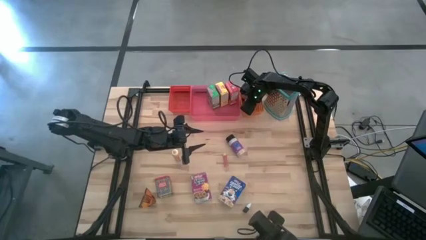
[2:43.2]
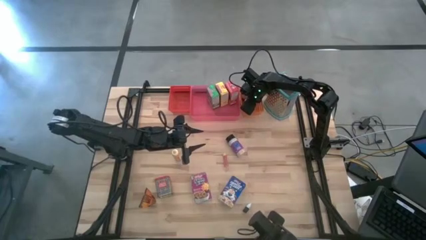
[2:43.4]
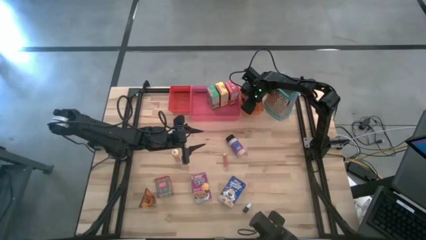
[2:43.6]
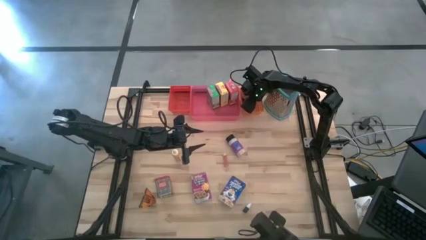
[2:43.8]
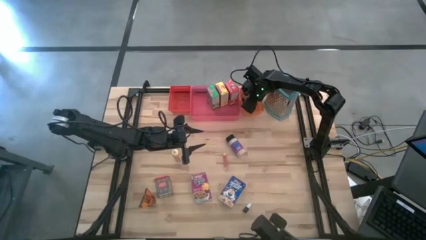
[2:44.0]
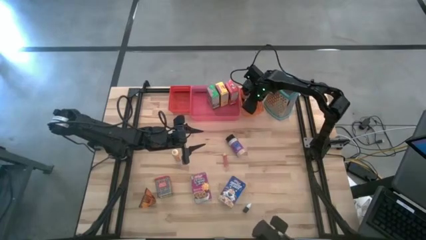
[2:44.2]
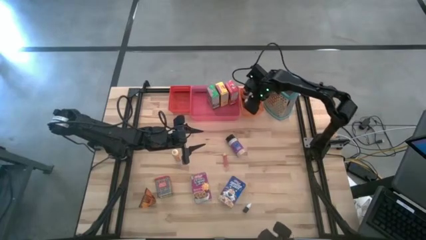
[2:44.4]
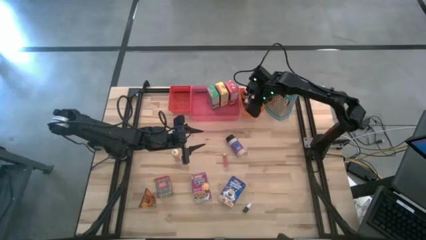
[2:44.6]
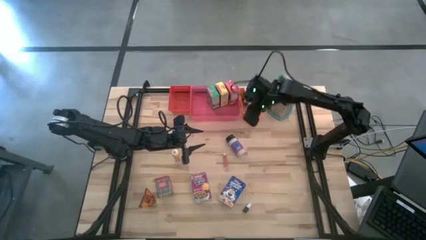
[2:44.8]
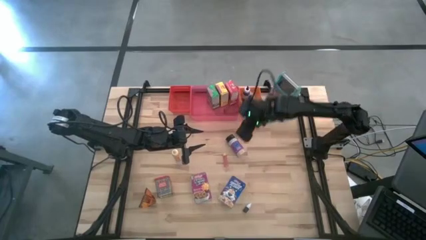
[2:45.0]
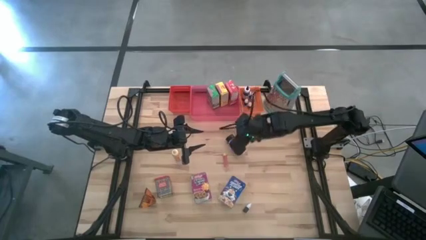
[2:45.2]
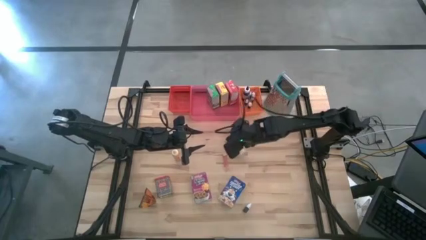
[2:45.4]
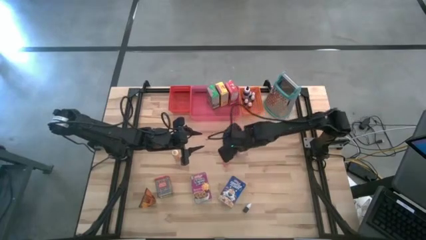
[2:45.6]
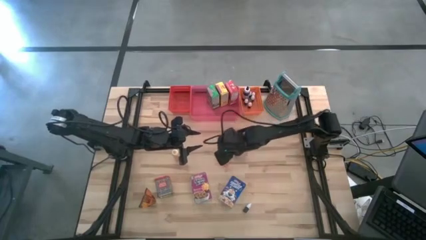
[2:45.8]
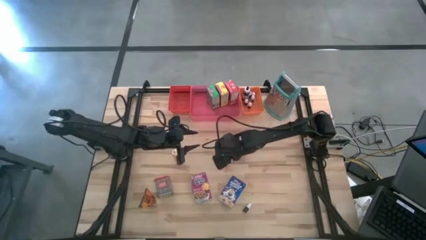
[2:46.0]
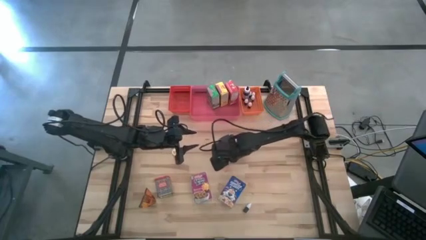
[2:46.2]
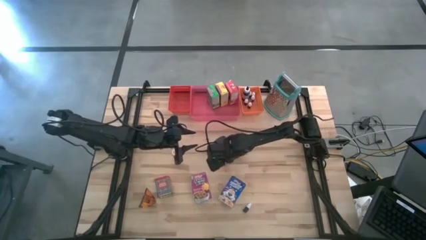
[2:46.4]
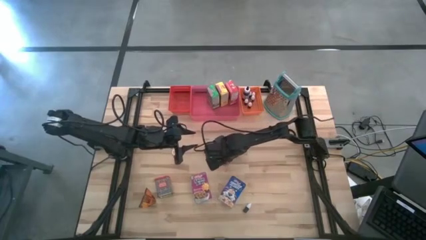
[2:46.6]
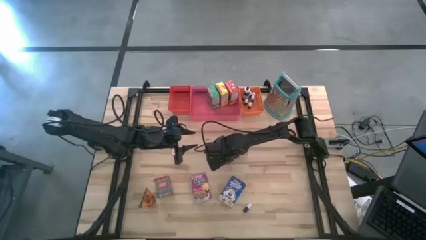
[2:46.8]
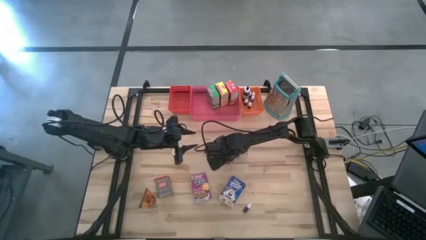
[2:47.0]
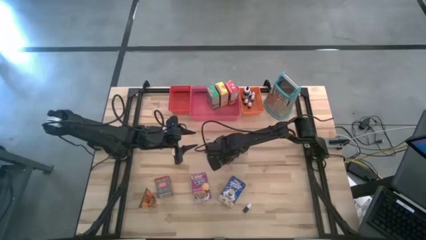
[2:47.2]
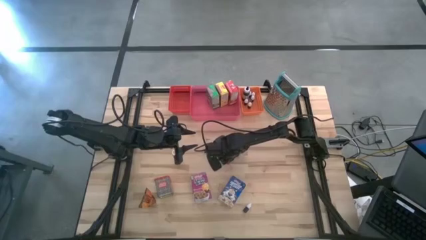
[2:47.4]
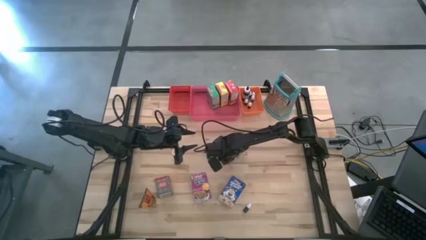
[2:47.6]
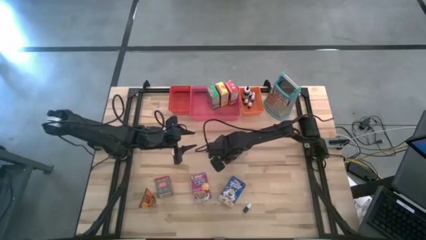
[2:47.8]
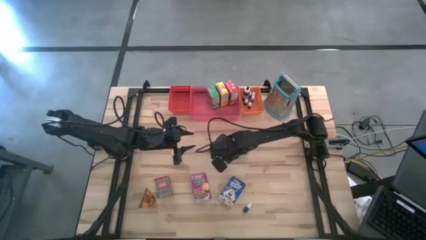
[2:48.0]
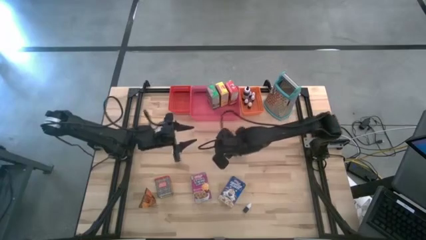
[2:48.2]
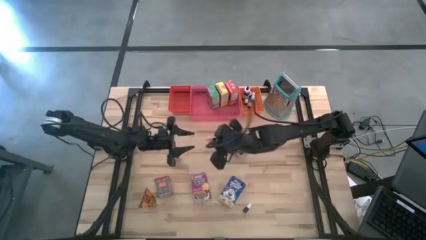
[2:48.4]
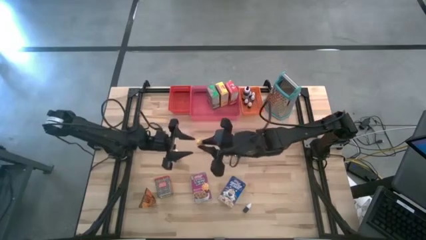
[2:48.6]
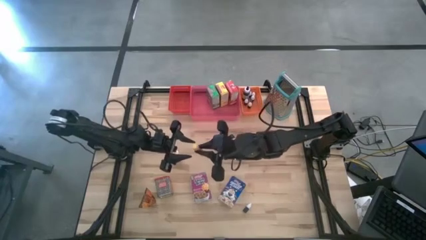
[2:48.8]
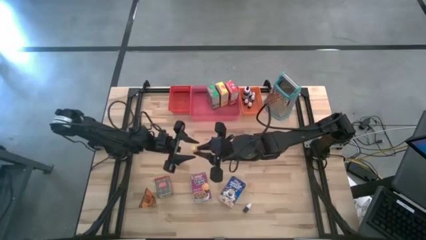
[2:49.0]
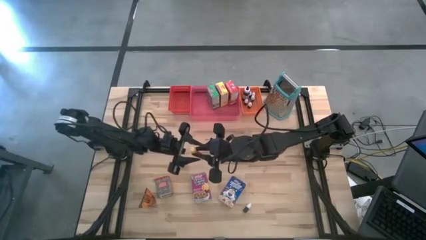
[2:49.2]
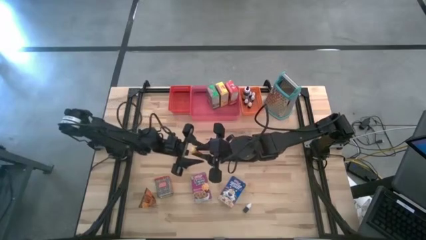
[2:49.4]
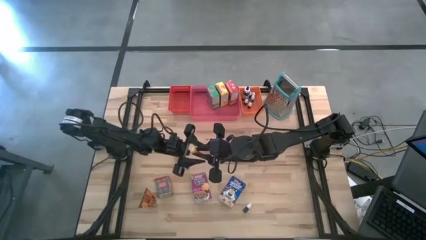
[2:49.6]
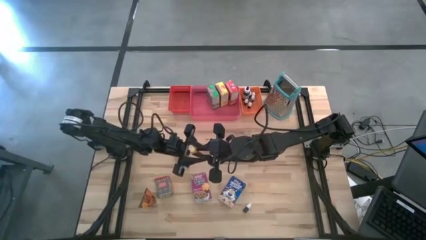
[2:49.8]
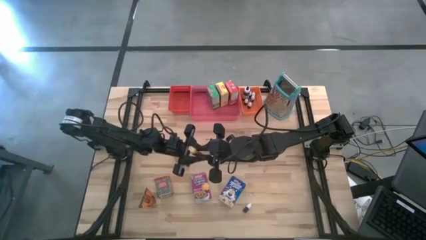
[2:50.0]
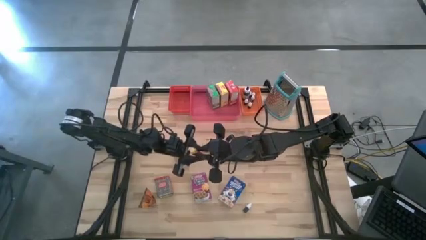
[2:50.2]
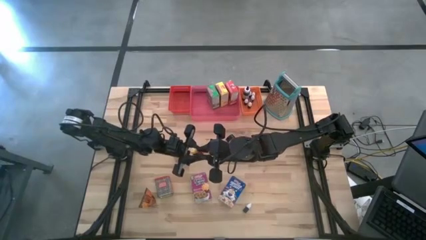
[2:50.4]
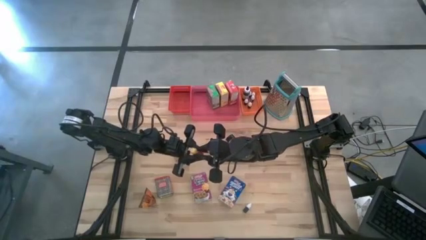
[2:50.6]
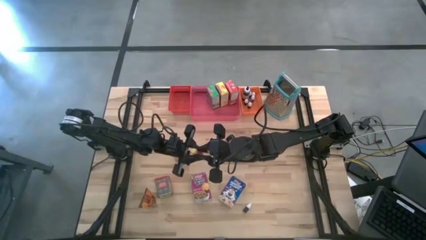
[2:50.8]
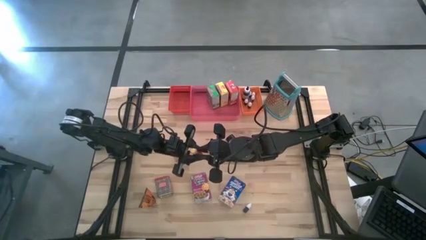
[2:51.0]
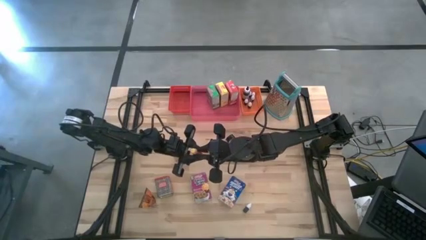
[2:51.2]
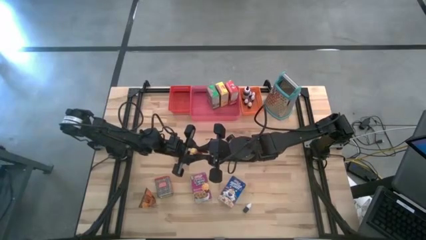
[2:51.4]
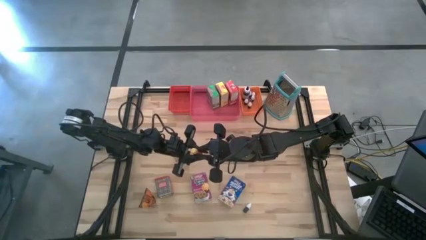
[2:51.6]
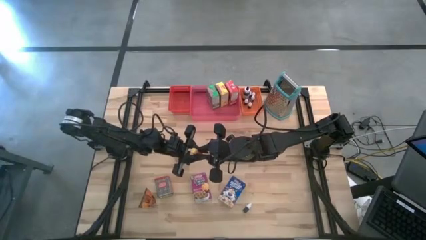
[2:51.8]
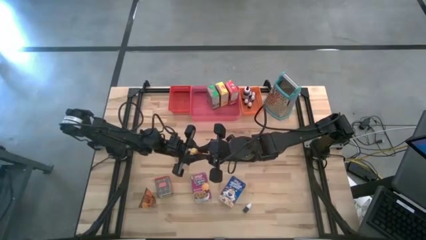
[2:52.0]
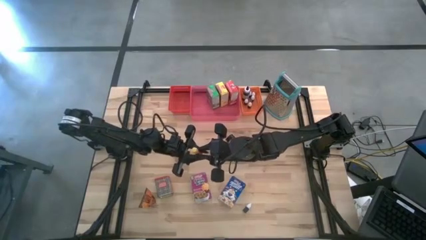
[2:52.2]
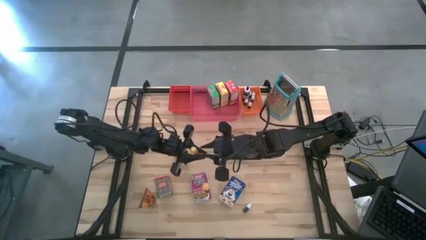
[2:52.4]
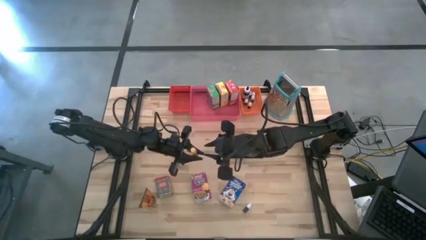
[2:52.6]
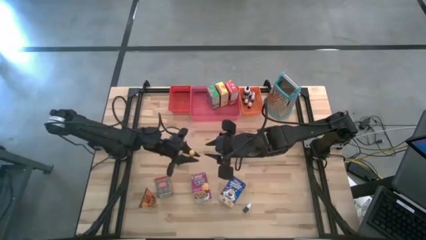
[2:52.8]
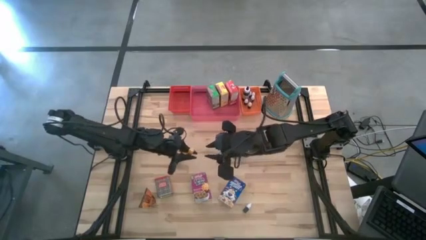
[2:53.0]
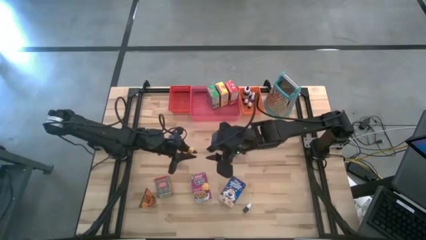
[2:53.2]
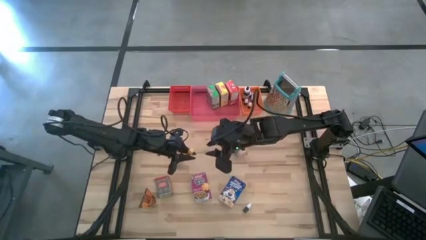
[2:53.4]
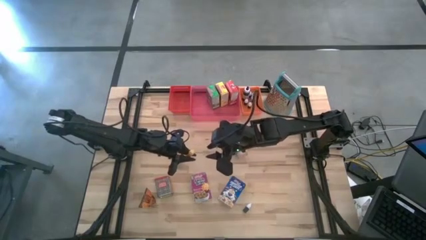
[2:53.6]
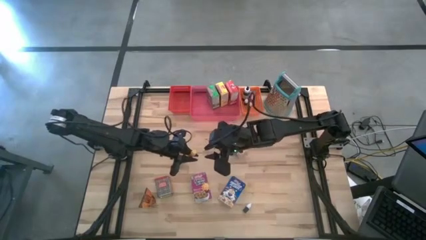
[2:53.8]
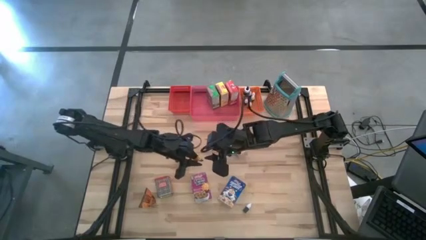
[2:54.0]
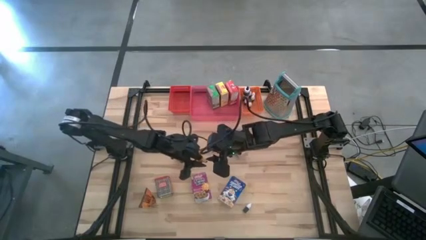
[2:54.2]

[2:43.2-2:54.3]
Task: Pick & Place Kitchen Items
Put the orange food coloring bottle into the orange bin
